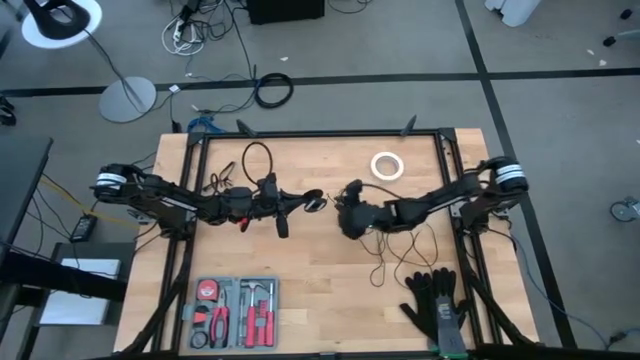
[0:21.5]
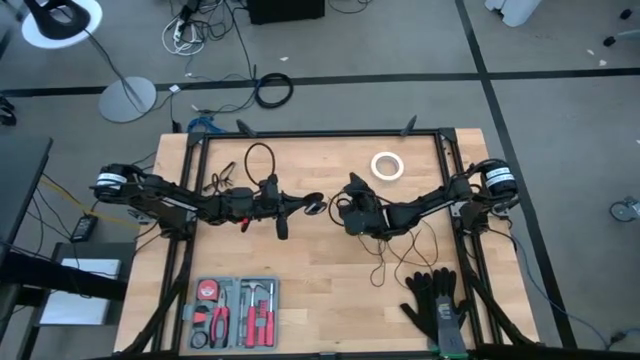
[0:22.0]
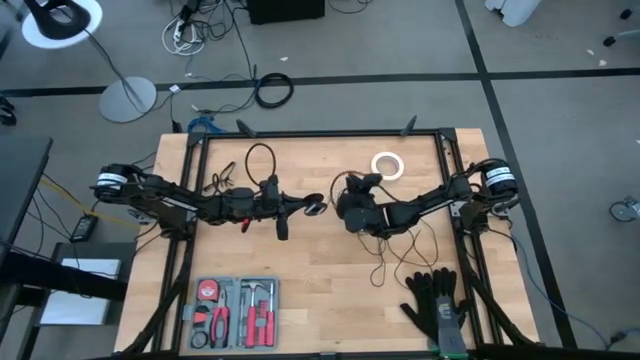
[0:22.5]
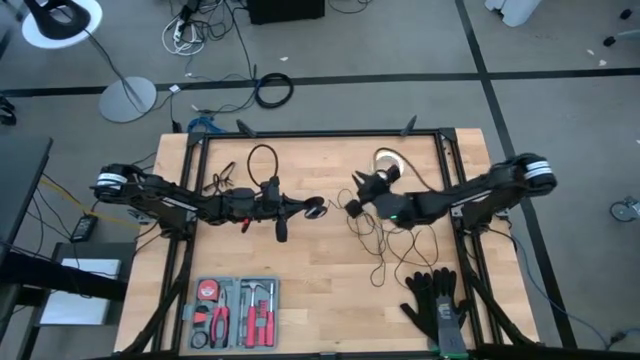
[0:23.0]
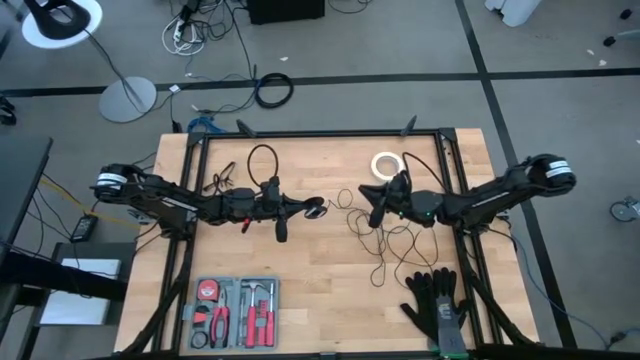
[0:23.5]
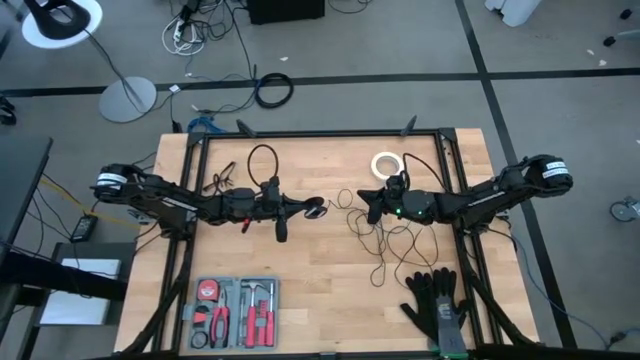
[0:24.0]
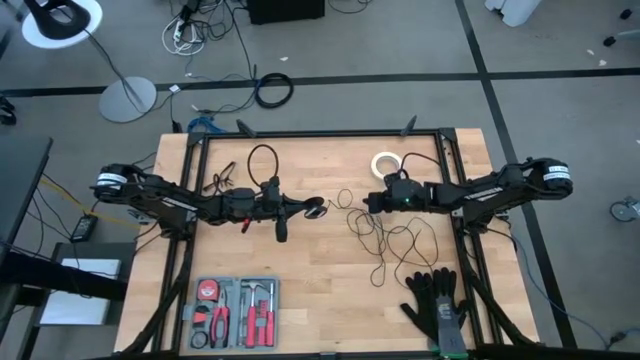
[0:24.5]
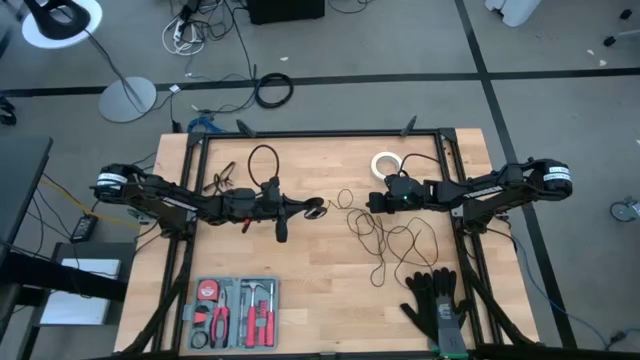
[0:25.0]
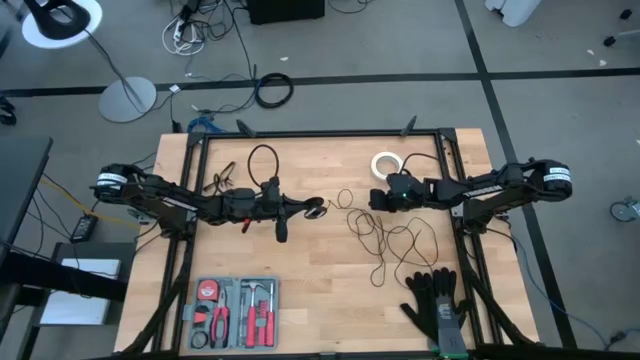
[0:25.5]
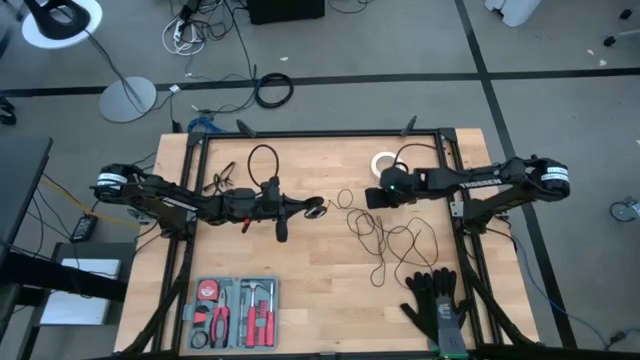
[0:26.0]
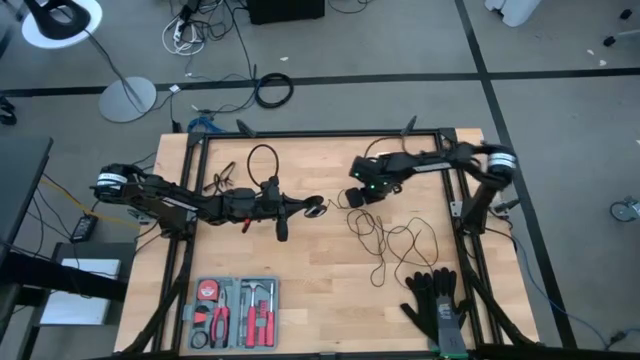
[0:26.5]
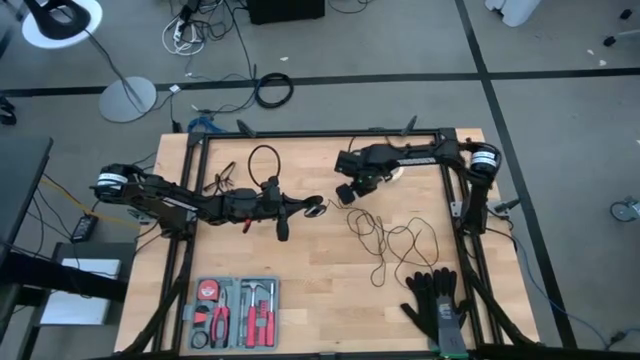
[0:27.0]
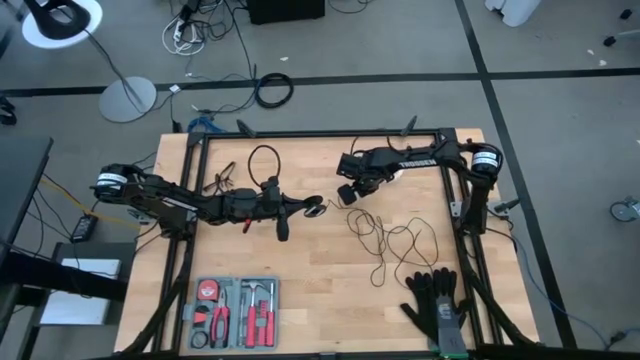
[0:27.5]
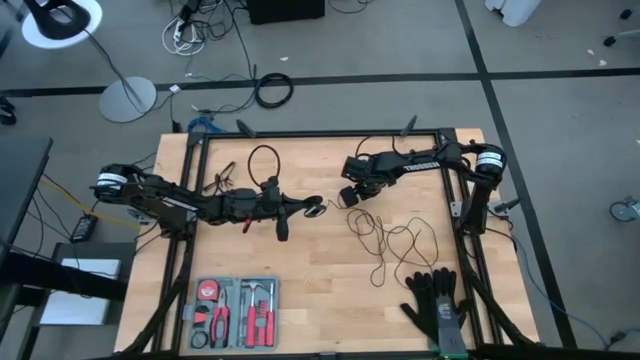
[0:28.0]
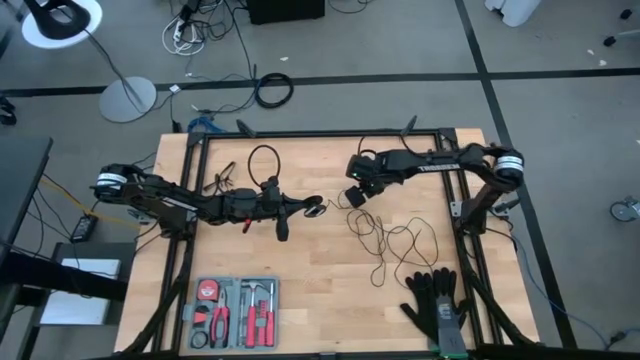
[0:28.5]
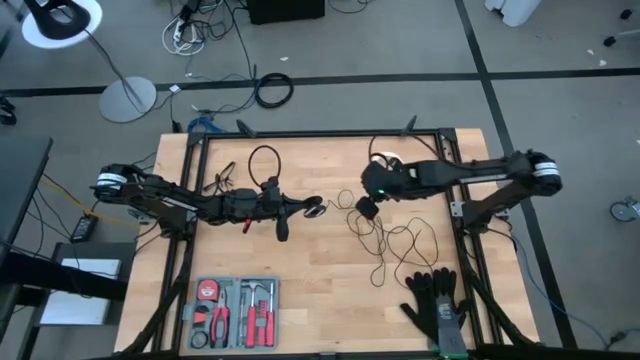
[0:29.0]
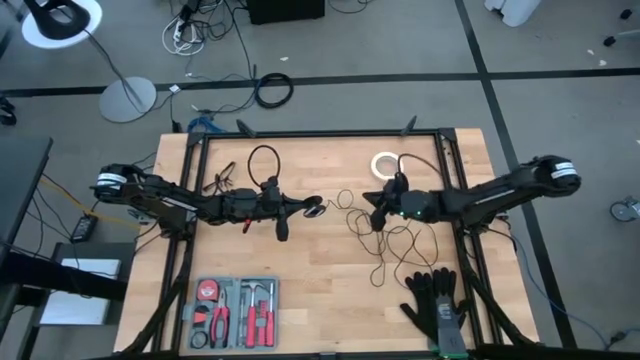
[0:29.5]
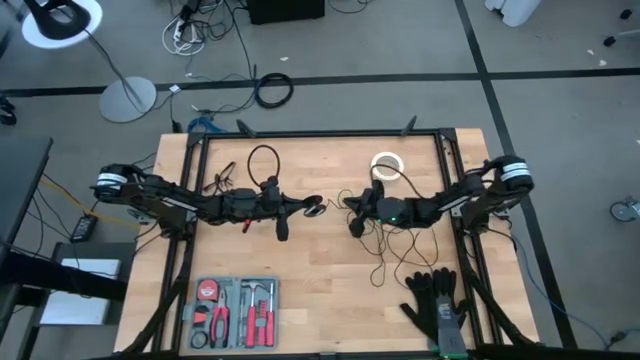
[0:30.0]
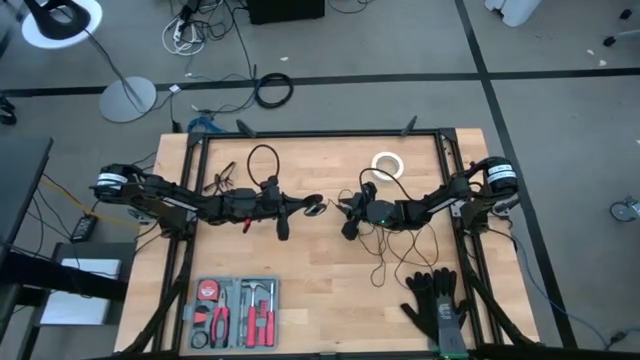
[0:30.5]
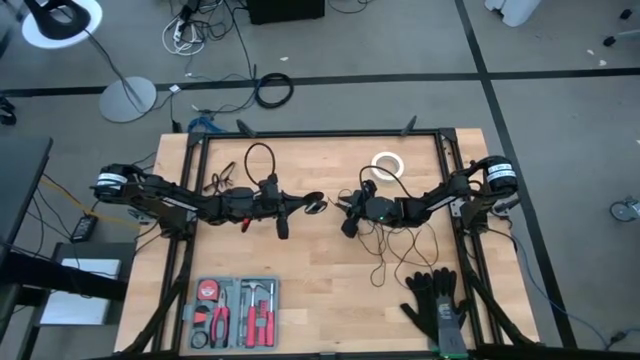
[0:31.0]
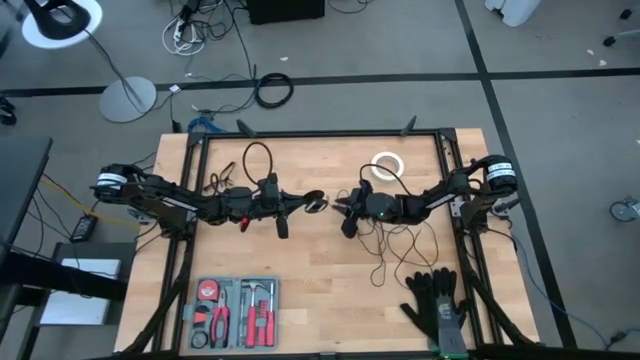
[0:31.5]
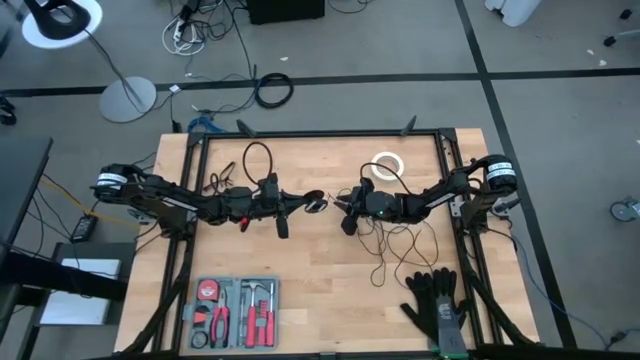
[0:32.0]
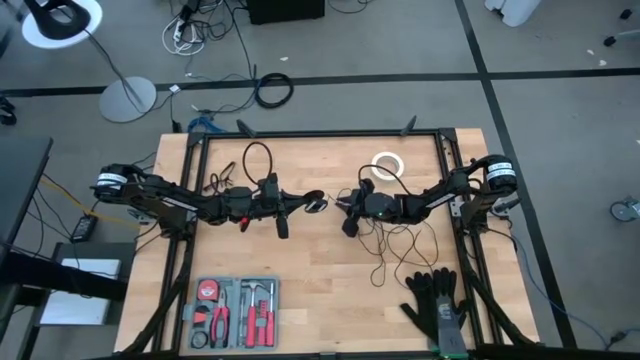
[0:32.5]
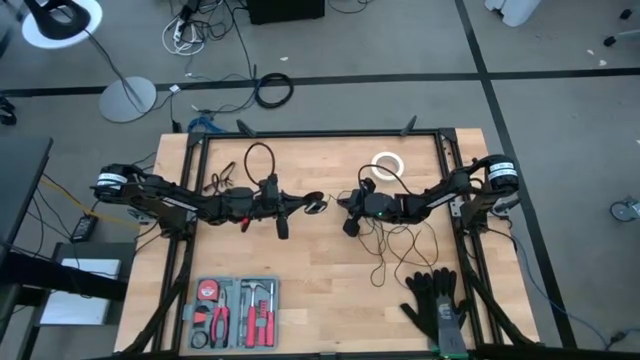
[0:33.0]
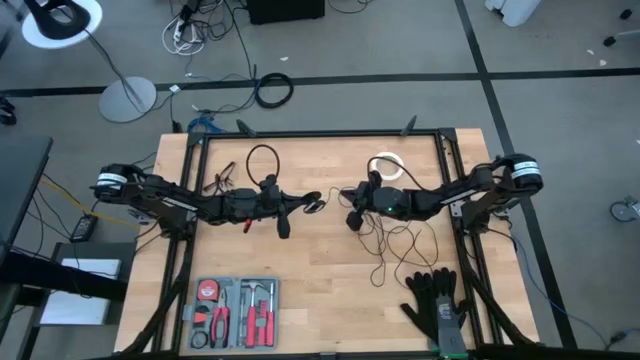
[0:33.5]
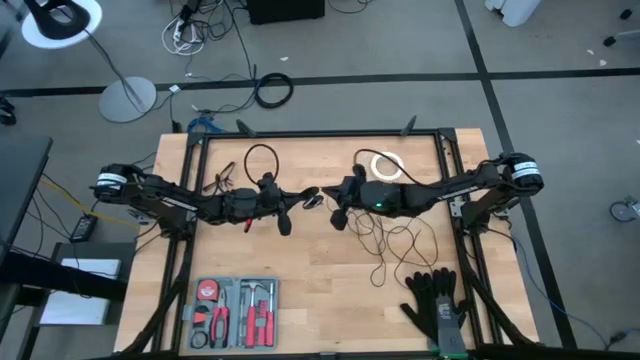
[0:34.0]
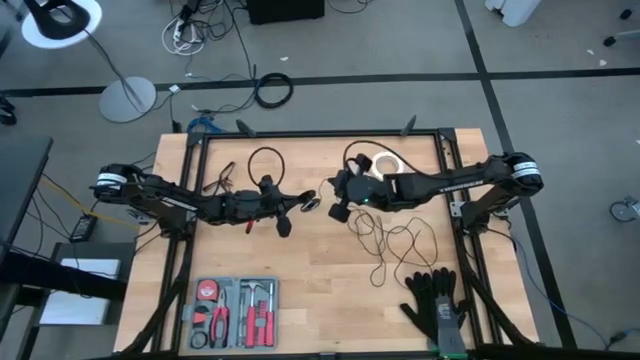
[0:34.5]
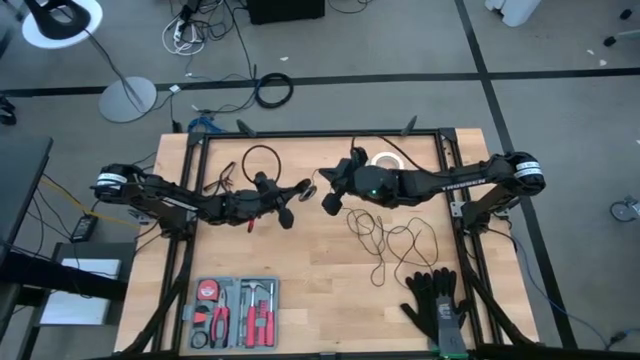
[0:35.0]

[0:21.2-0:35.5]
Task: Coil cords
Coil the black wire on the black spool

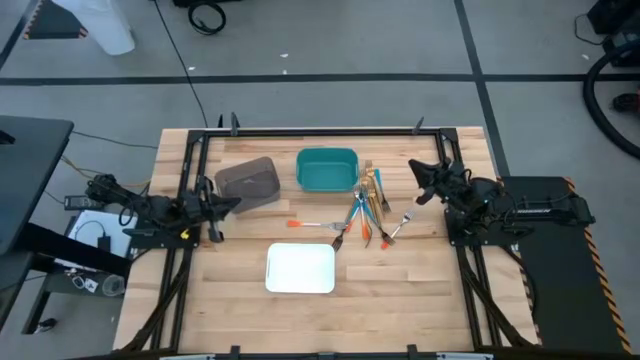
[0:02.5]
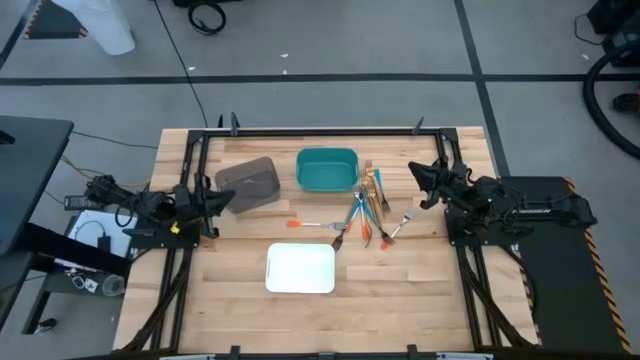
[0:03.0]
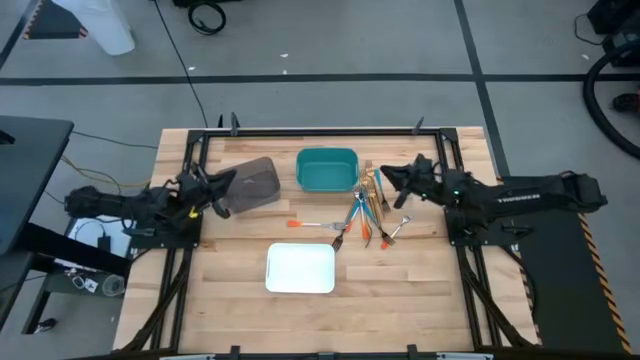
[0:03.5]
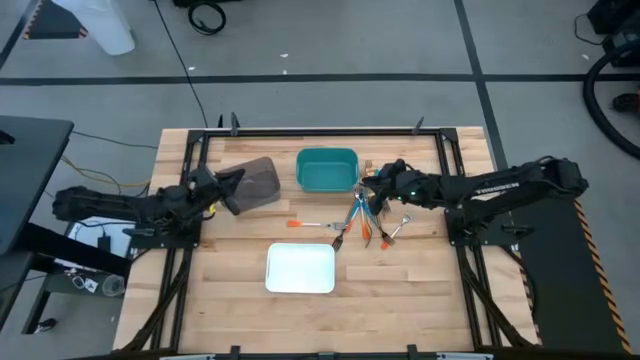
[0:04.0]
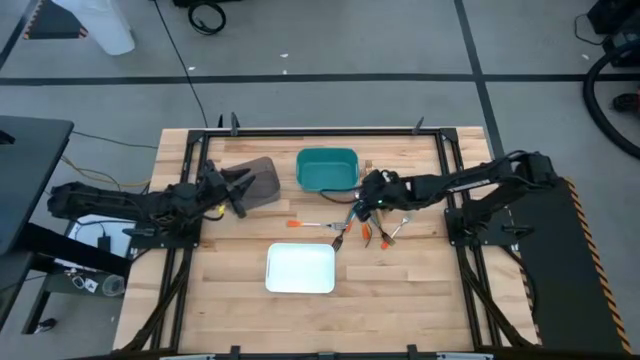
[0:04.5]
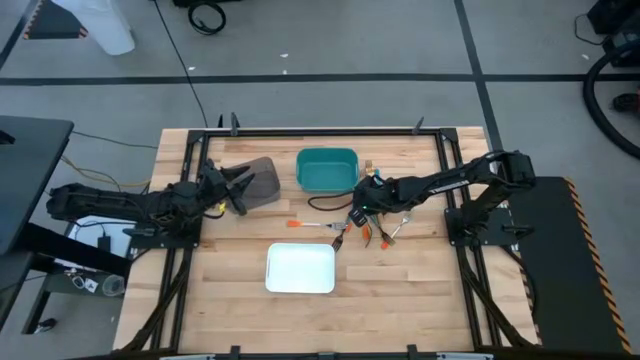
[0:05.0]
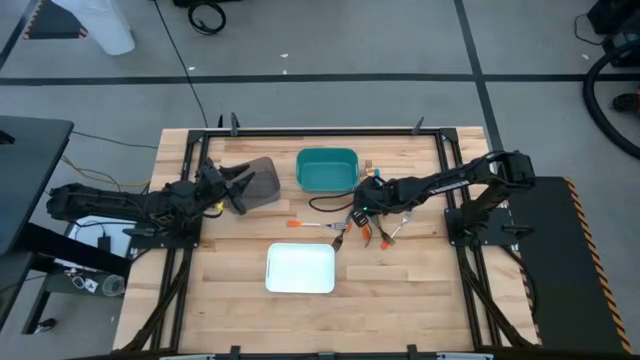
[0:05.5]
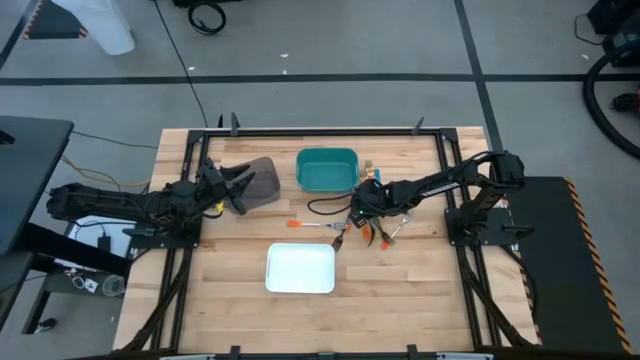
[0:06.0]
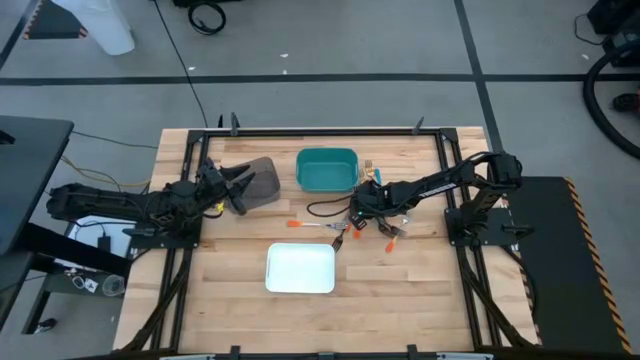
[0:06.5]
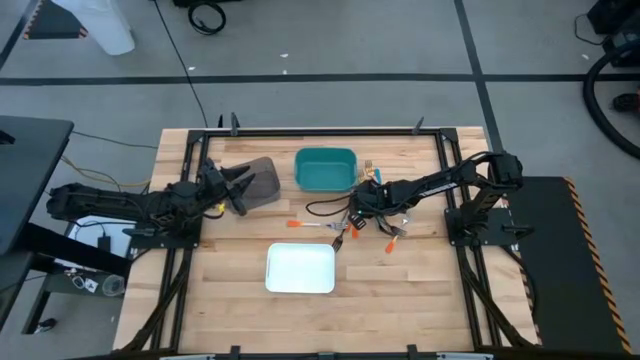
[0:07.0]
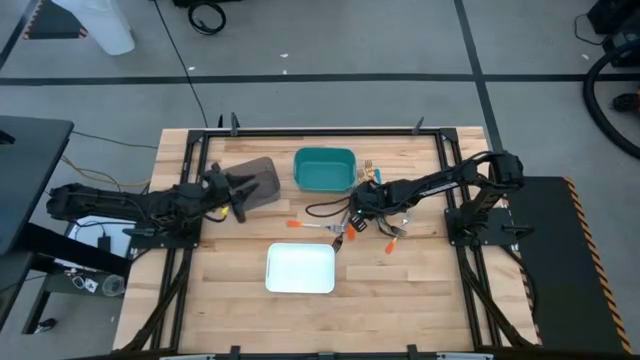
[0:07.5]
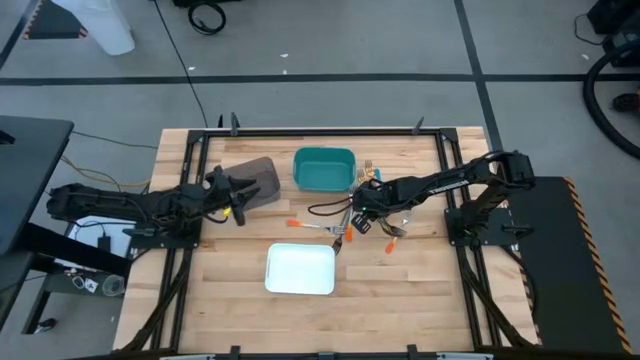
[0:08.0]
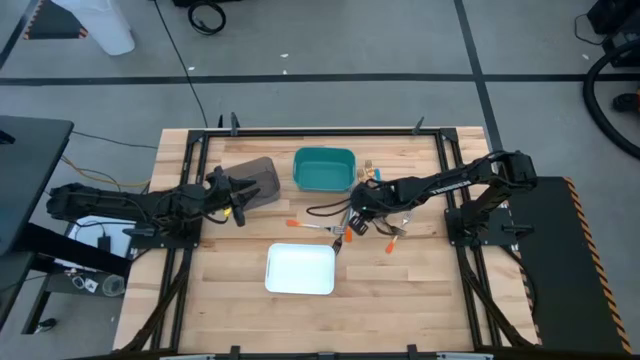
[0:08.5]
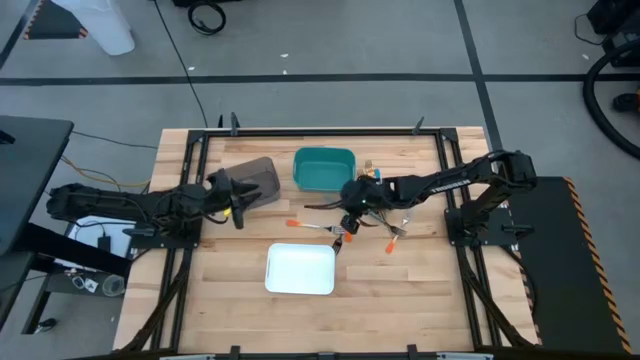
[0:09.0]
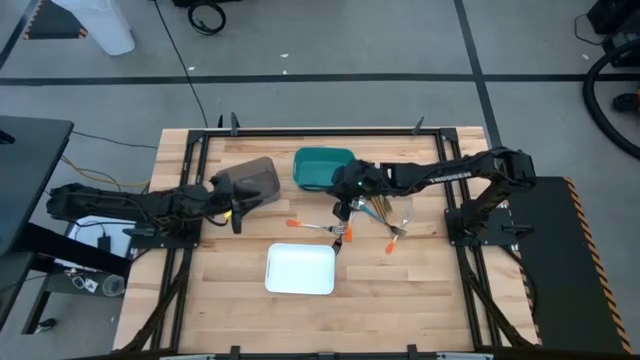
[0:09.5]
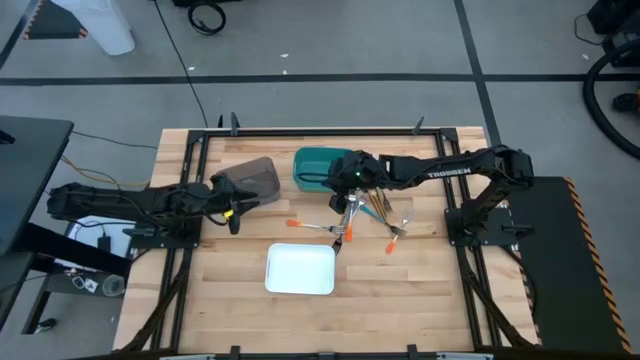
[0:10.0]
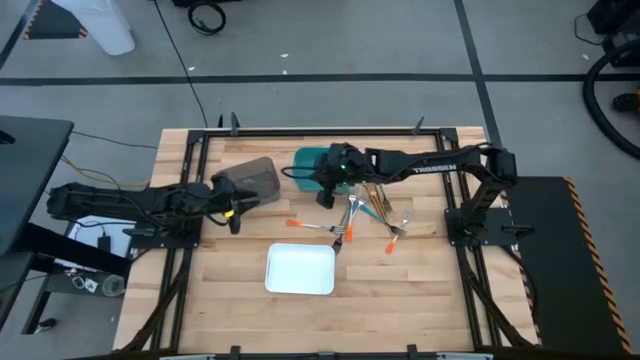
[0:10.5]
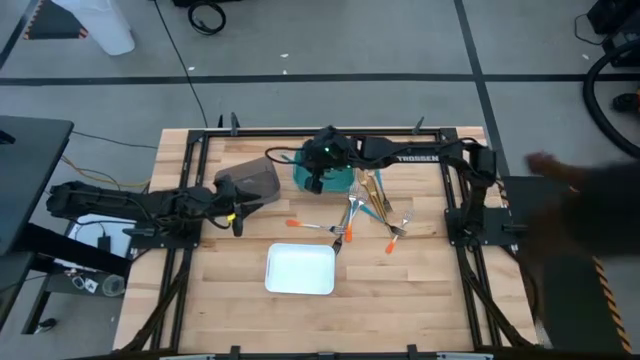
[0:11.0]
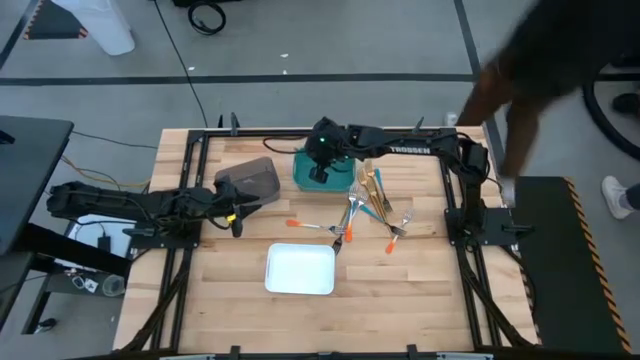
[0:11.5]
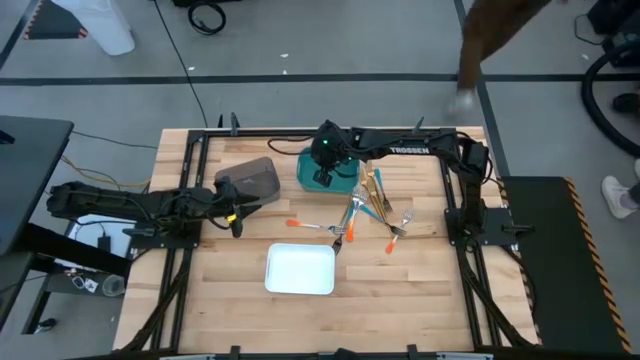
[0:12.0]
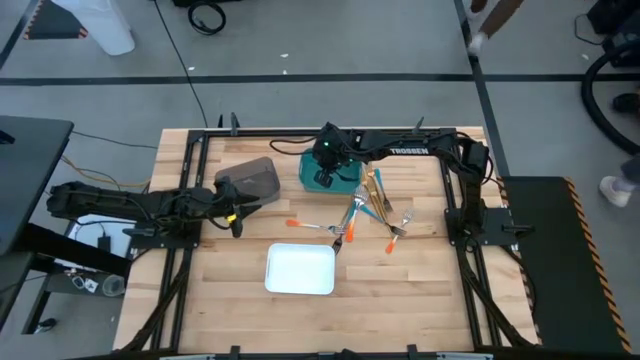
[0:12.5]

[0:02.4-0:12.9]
Task: Sort silverware by color (type)
Put the blue fork into the blue bin
